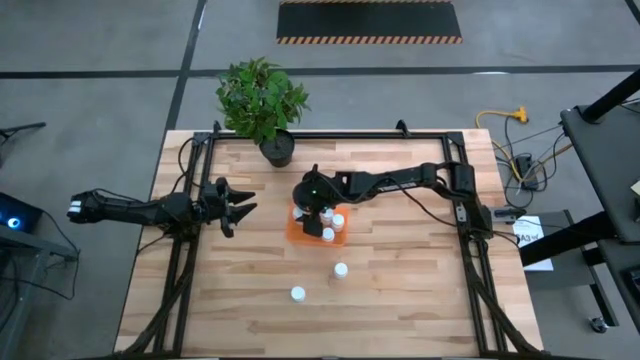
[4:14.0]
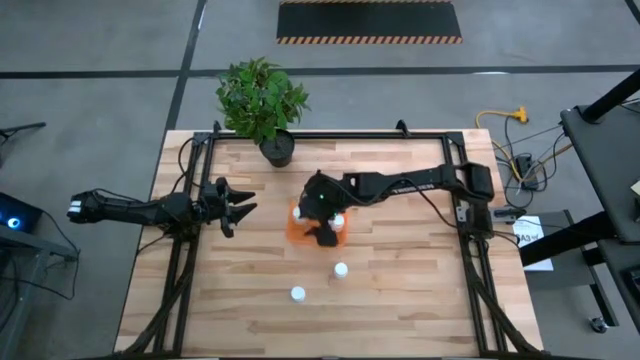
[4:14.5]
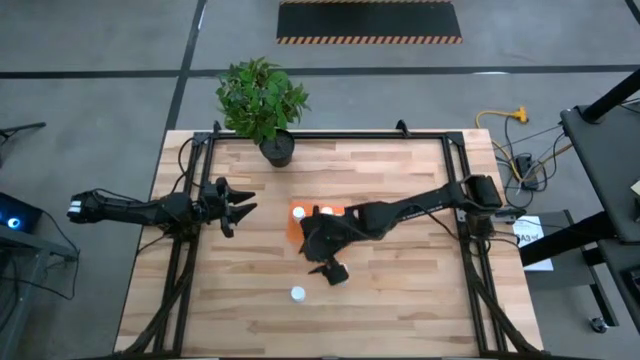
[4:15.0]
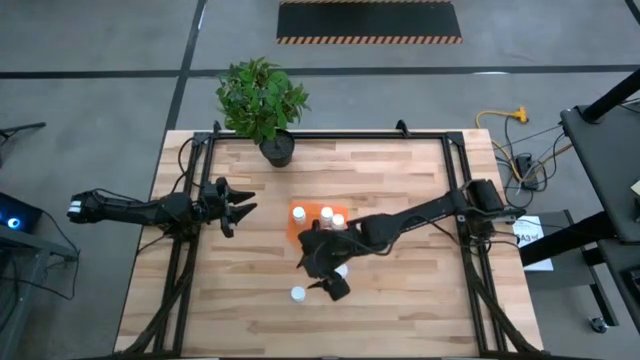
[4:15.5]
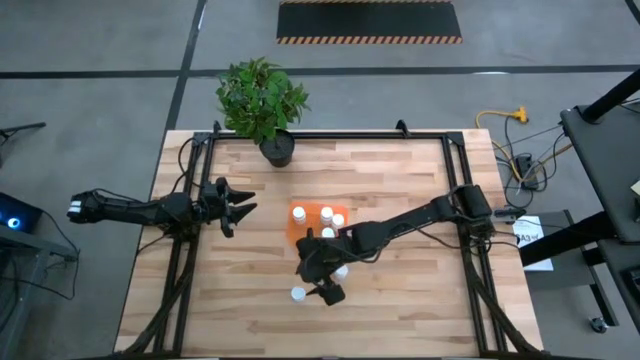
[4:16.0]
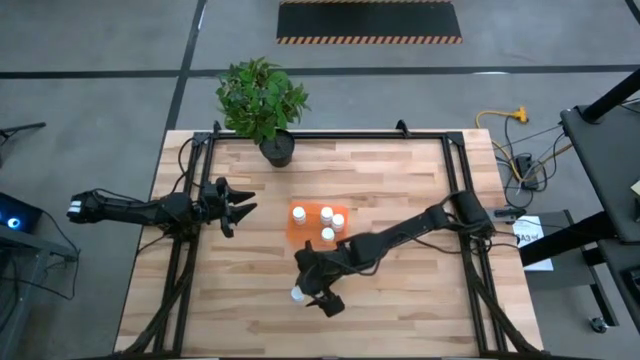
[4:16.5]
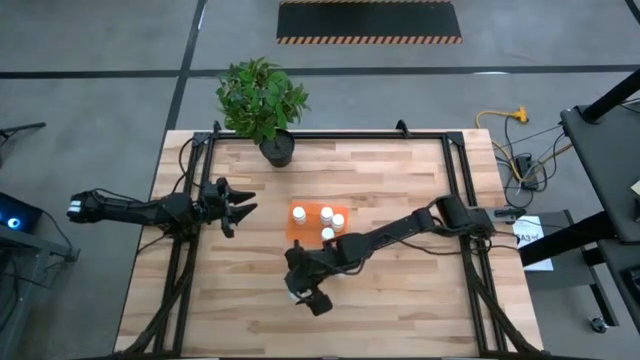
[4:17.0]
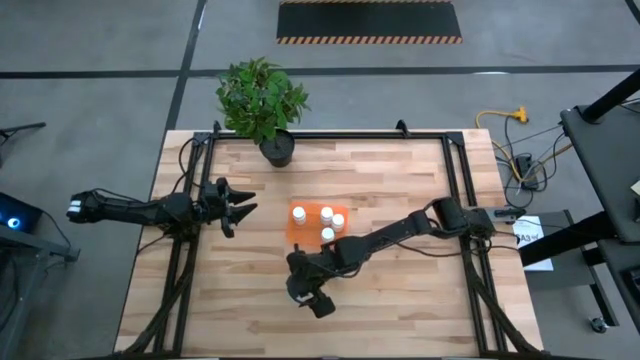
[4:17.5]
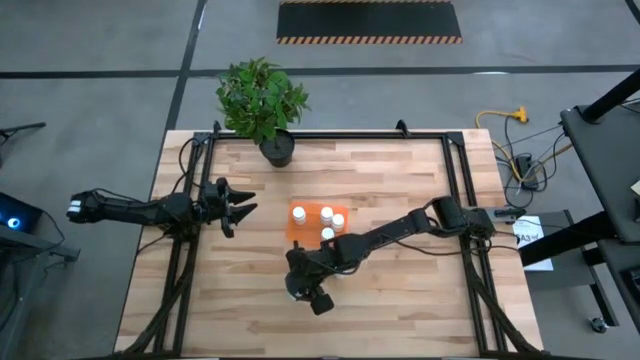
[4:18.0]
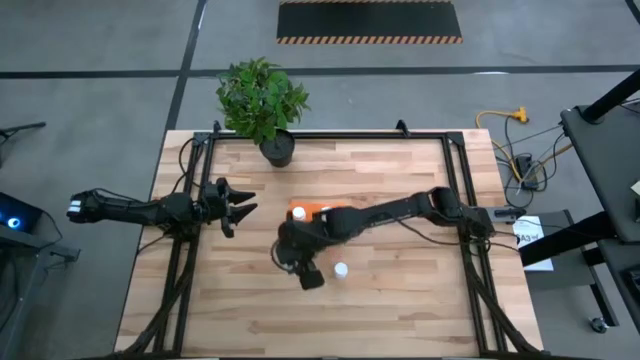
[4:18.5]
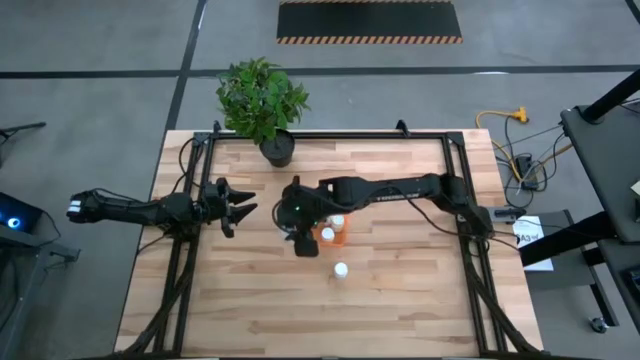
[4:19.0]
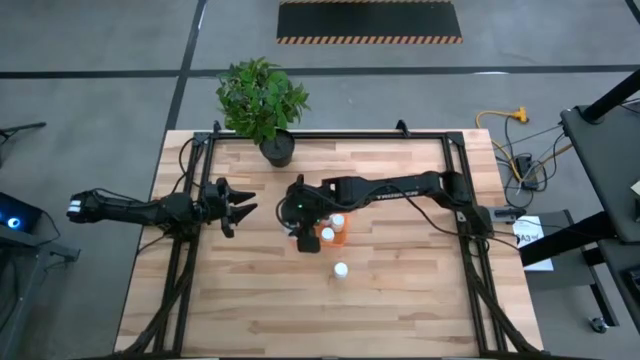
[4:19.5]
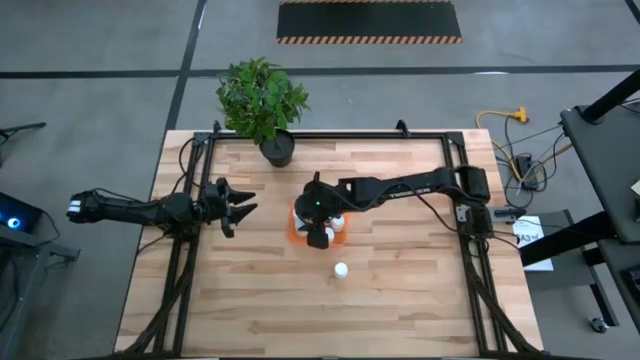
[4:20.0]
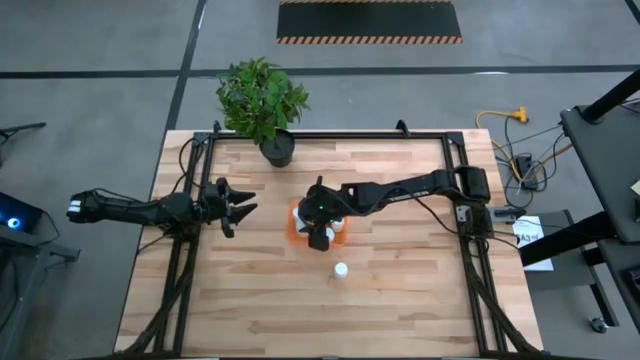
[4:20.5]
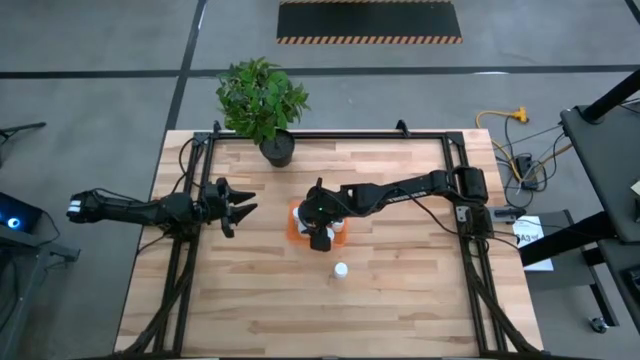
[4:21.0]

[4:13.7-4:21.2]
Task: Pick and place pill bottles into a basket
Put the white pill bottle into the orange container

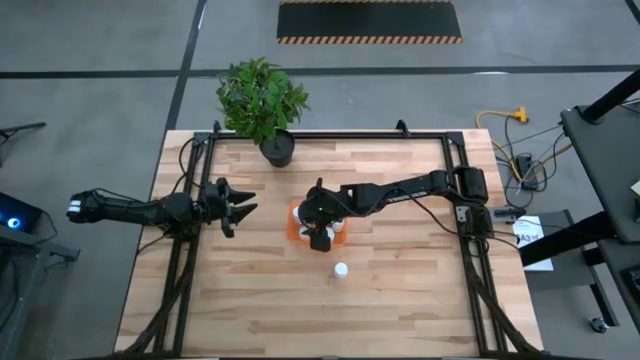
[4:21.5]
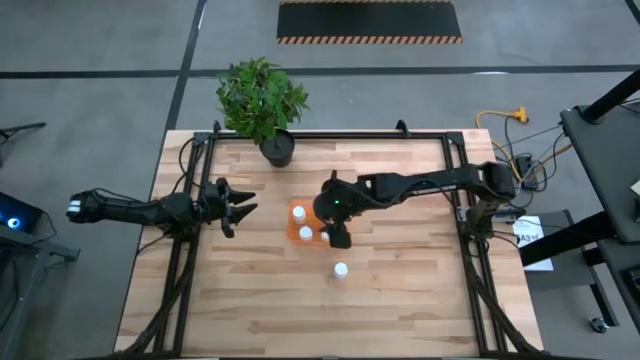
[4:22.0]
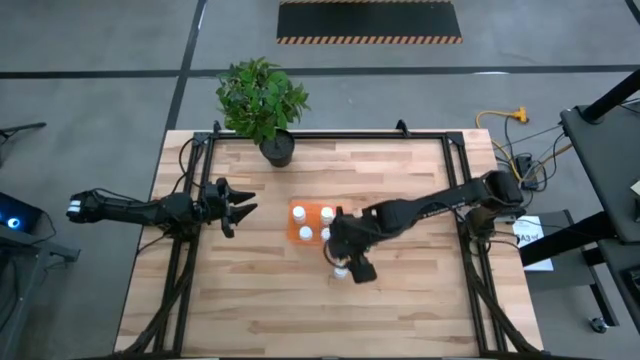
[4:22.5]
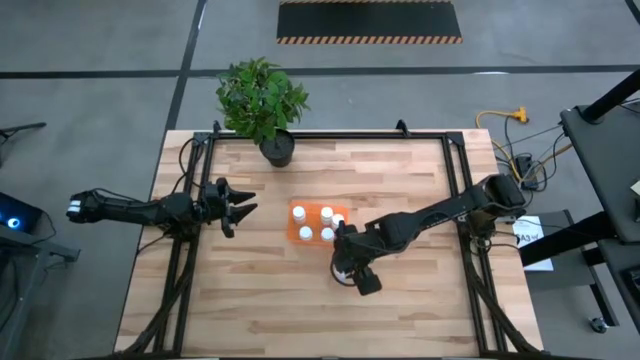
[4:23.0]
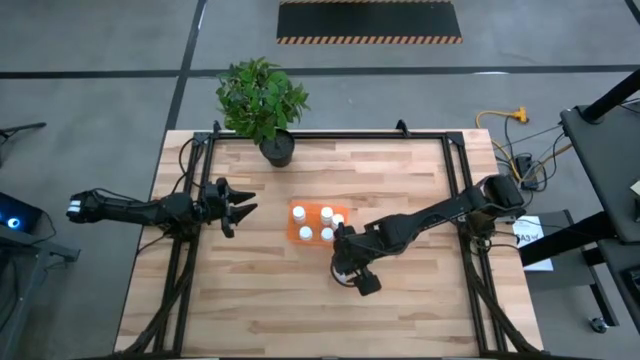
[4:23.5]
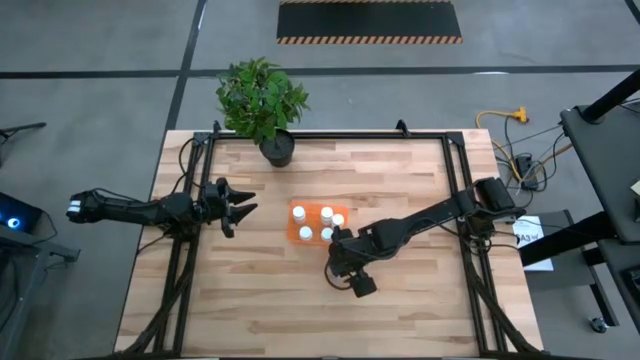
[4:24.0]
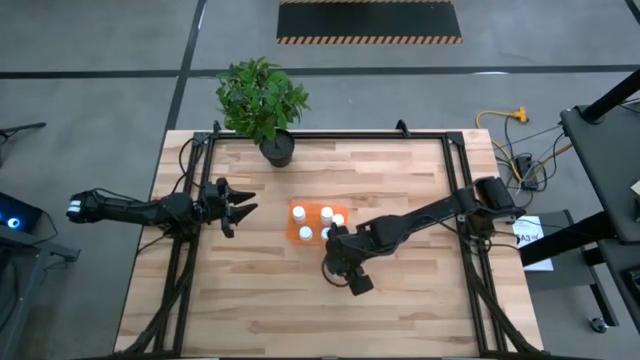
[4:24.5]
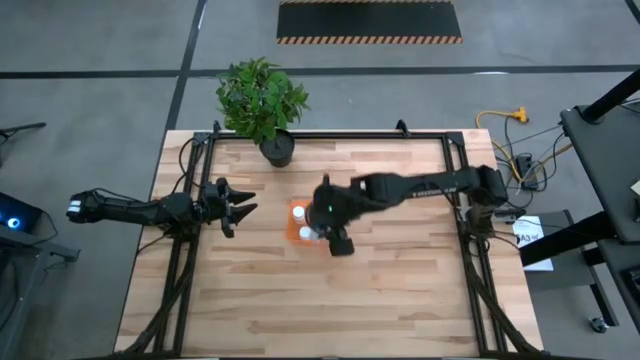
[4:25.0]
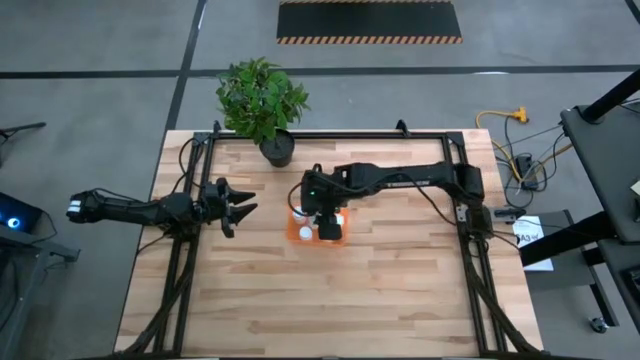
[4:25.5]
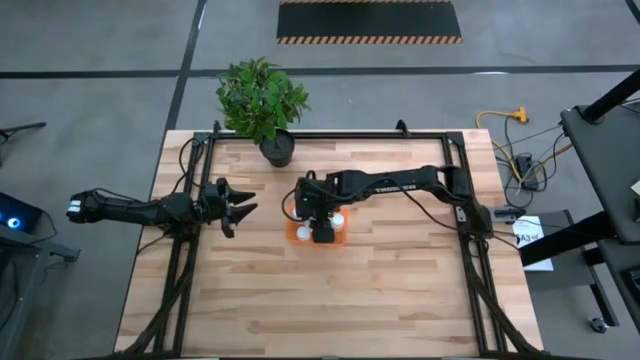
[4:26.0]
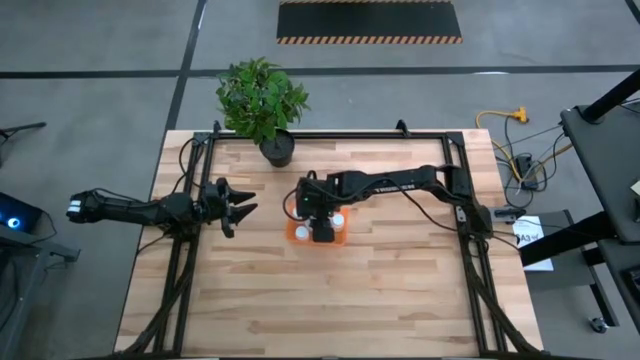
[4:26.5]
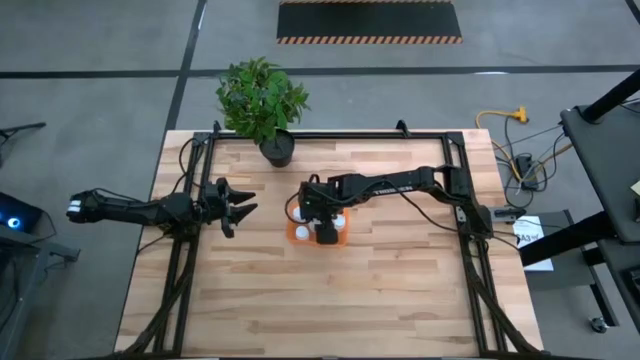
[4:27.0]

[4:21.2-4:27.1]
Put the white pill bottle into the orange container

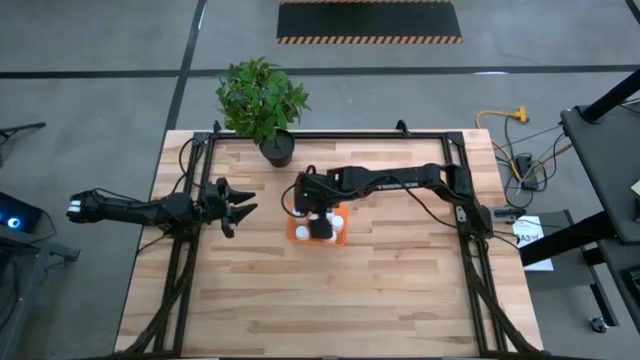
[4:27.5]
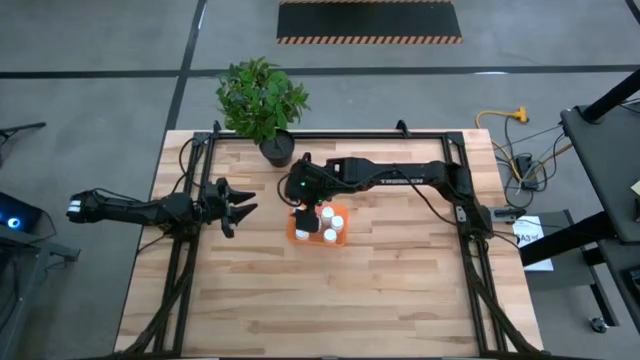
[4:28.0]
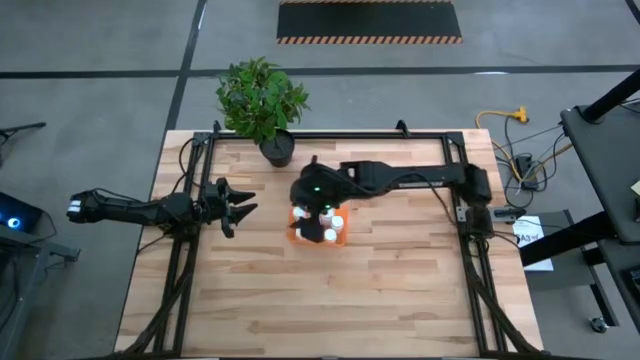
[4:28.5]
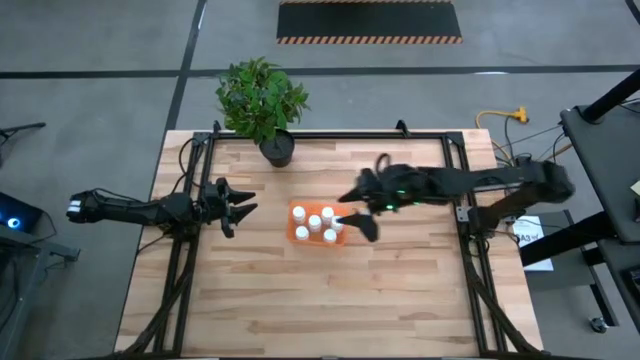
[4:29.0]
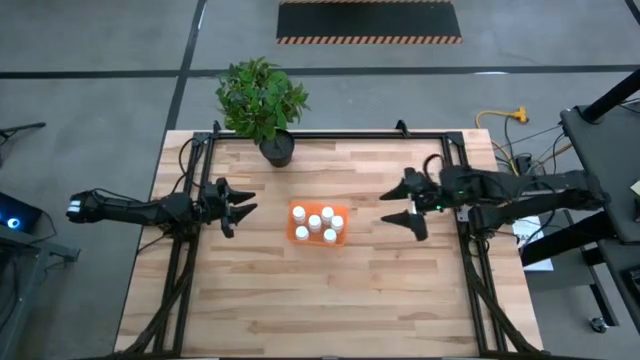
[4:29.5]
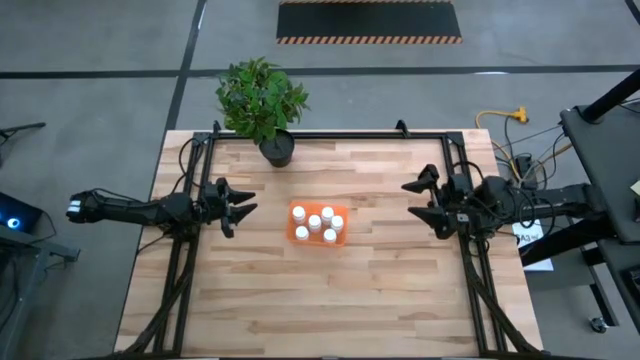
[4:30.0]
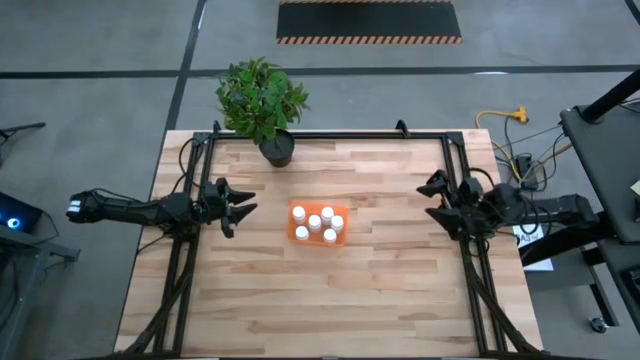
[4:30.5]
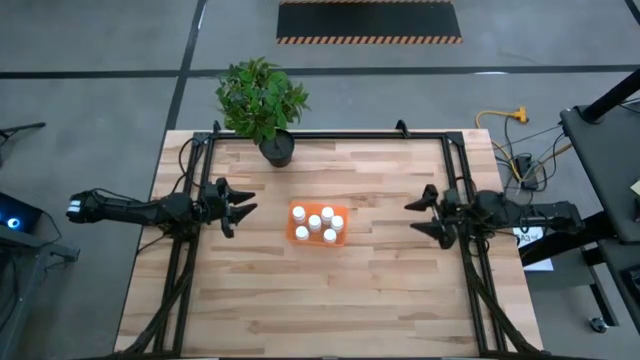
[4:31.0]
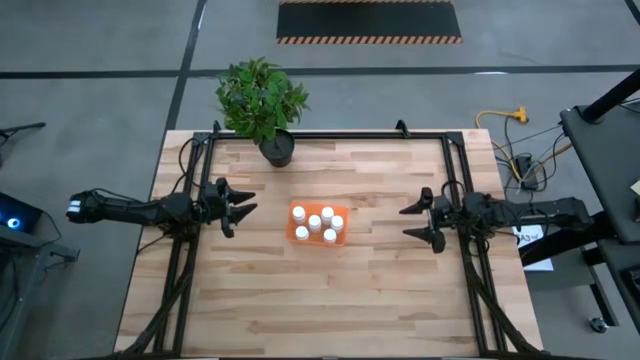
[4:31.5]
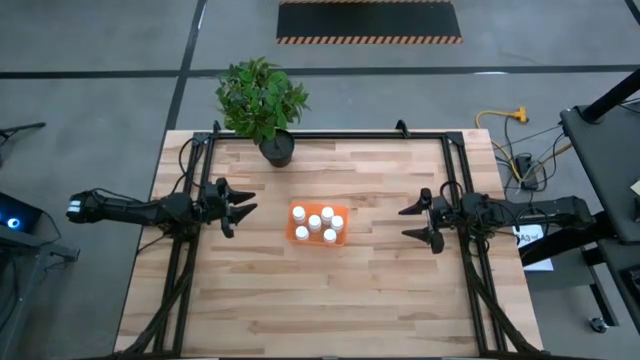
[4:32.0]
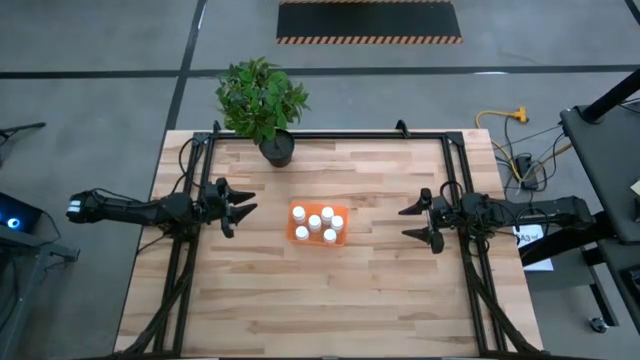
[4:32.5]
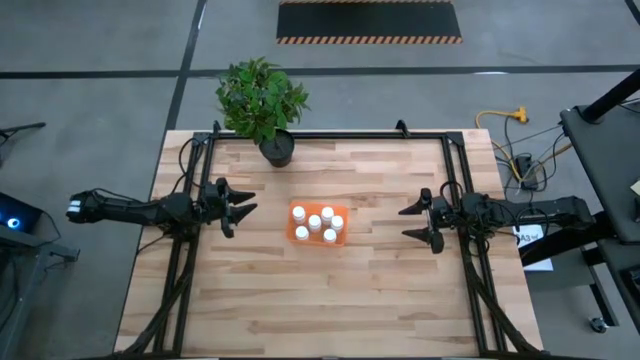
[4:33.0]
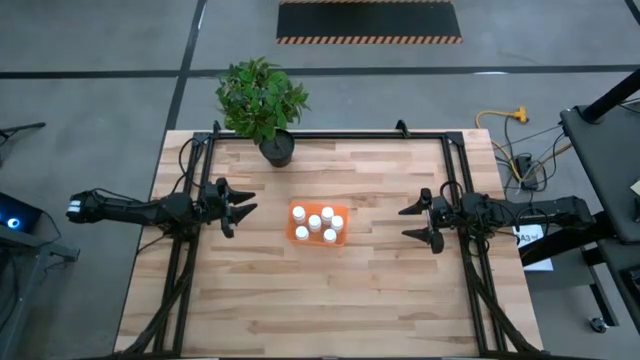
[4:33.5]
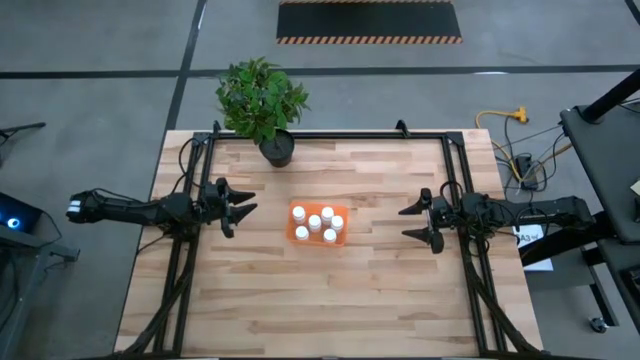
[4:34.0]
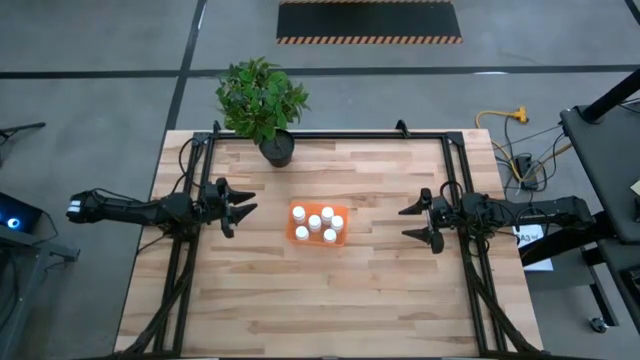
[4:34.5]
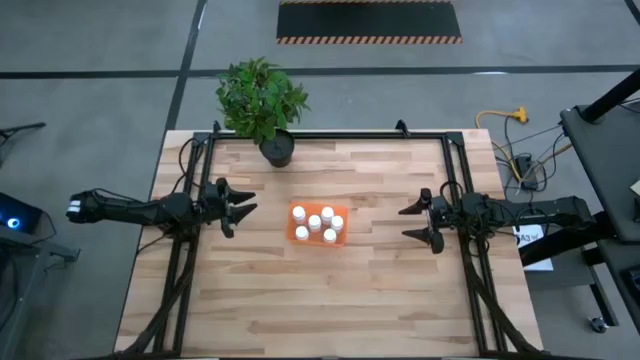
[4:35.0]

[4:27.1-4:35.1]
Return to Home Position

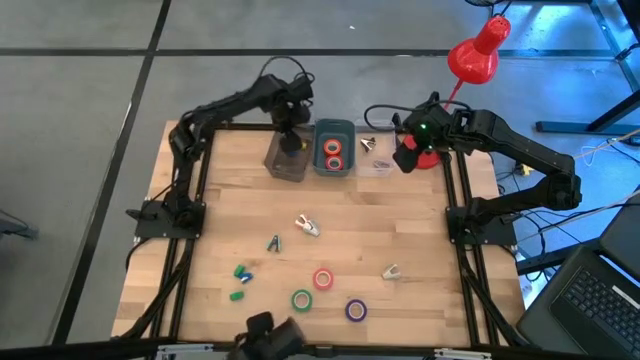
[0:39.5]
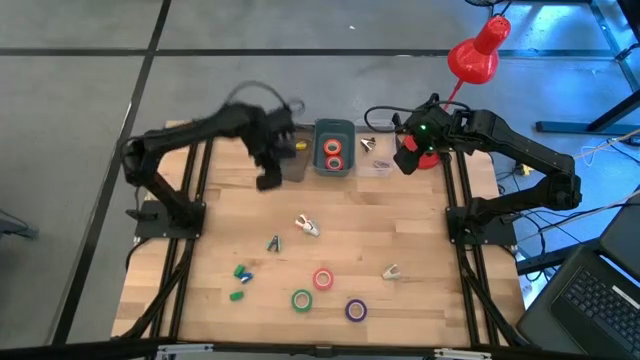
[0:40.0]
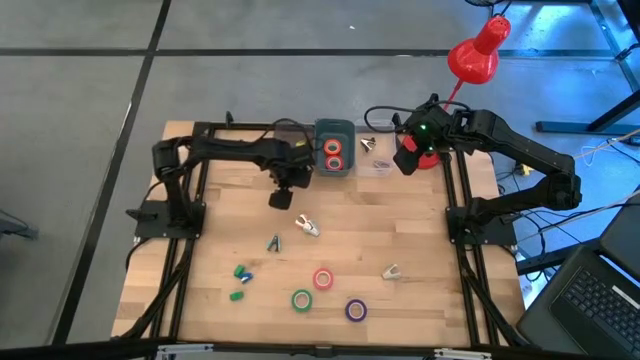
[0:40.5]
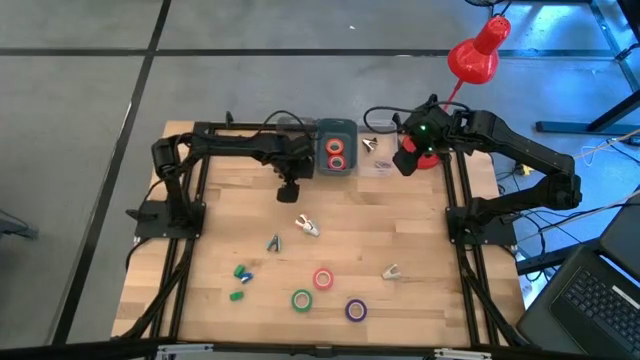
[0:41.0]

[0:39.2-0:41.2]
Task: Pick and place Stapler, Stapler remover, tape
Adjust the black bin
